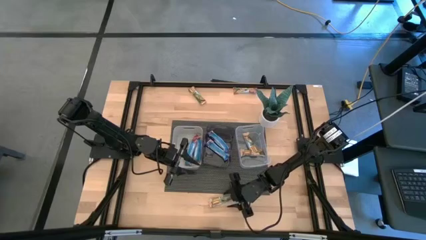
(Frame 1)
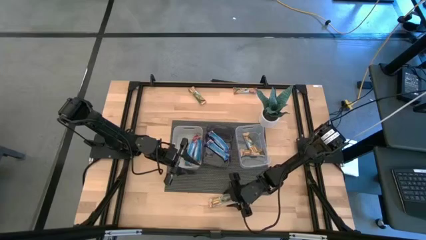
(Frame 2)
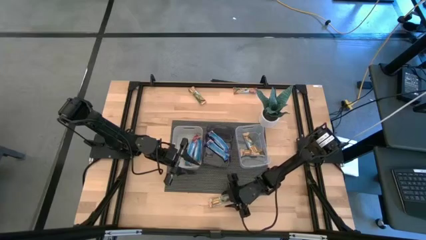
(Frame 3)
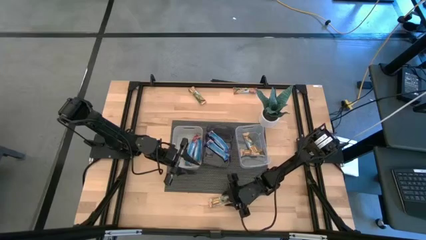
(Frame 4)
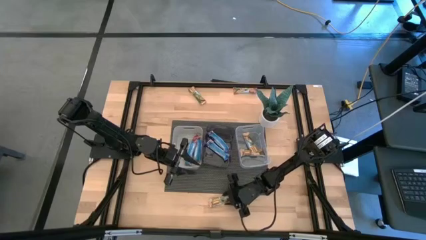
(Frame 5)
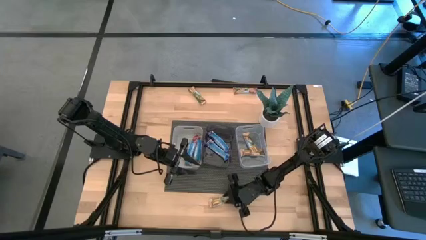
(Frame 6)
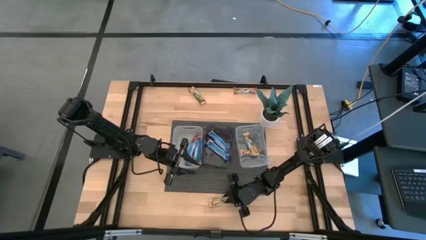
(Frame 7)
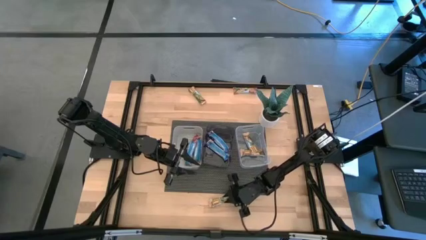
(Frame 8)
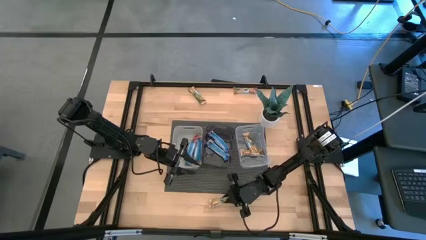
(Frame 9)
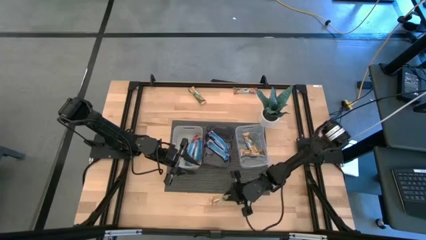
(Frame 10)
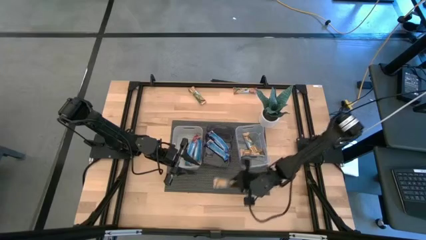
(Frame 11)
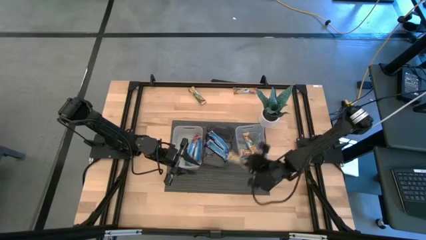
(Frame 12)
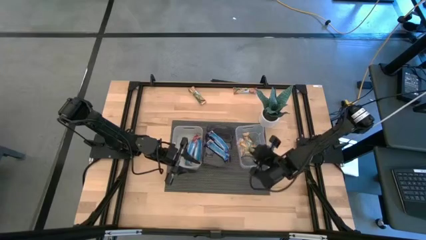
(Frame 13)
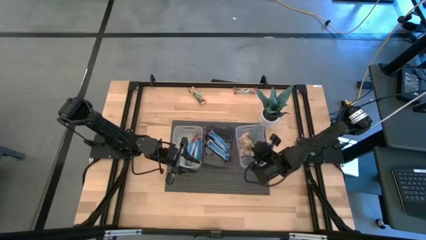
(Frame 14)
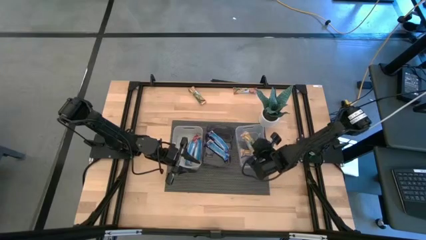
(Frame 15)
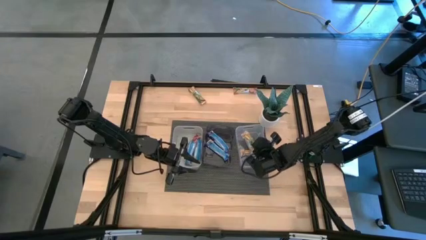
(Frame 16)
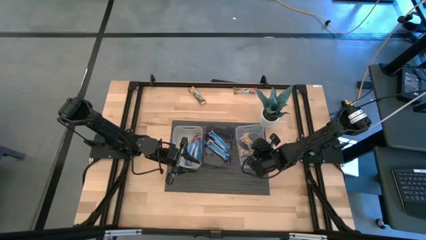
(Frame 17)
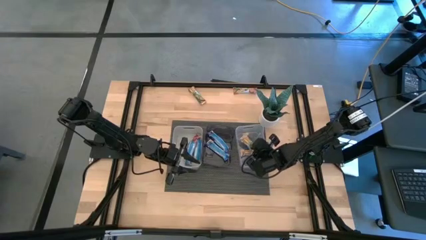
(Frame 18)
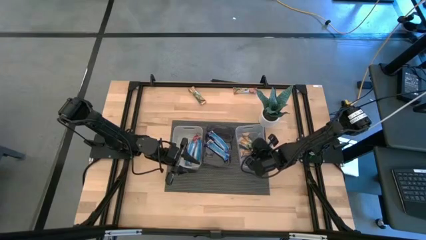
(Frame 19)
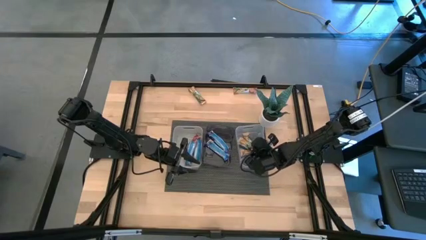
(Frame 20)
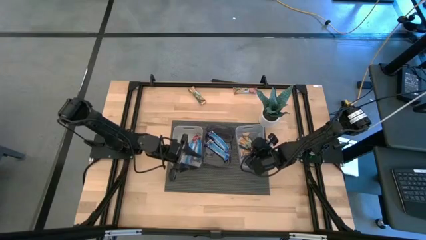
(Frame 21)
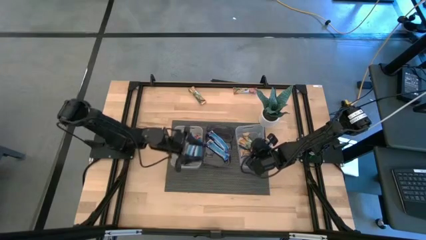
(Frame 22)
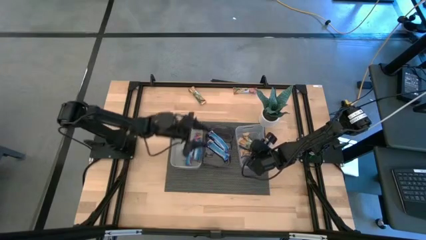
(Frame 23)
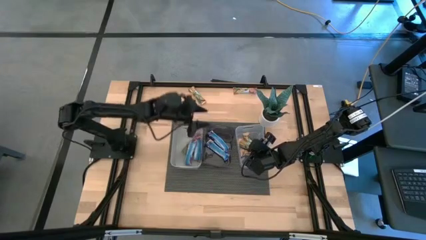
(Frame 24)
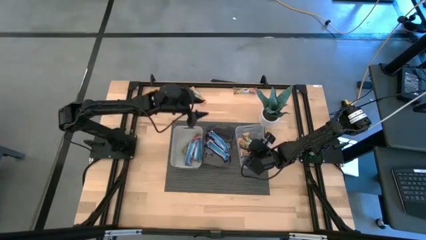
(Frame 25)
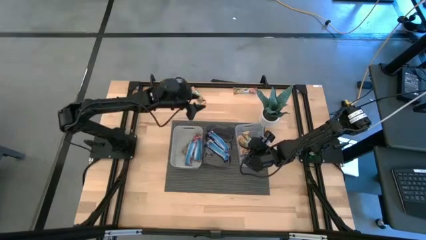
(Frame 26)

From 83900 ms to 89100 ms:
Task: Pick and place Granola Bars by type
Put the orange granola bar into the transparent bin

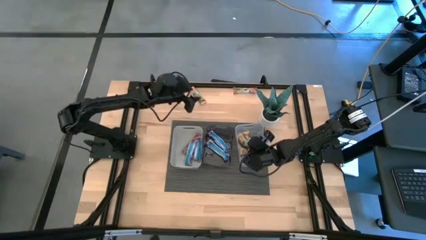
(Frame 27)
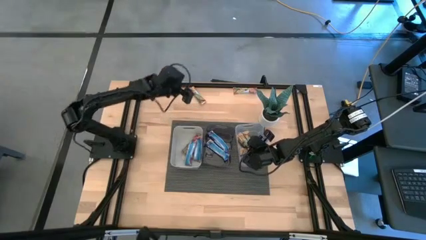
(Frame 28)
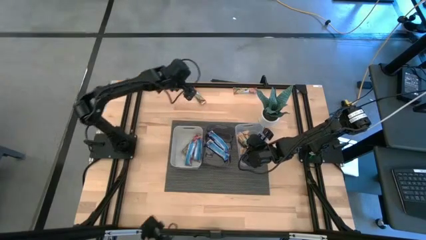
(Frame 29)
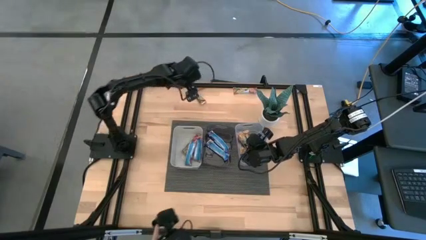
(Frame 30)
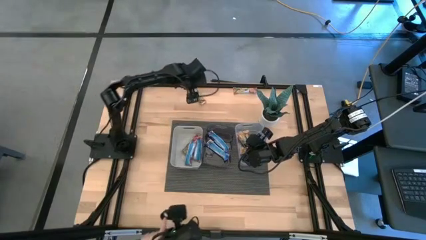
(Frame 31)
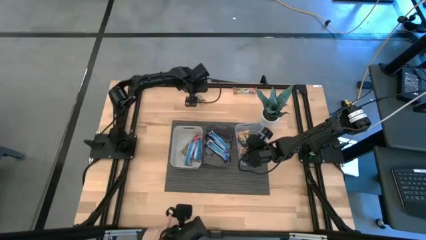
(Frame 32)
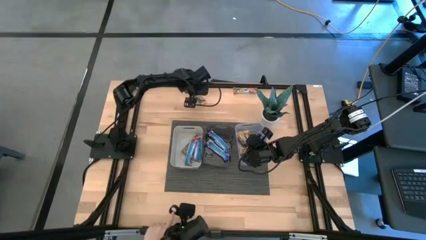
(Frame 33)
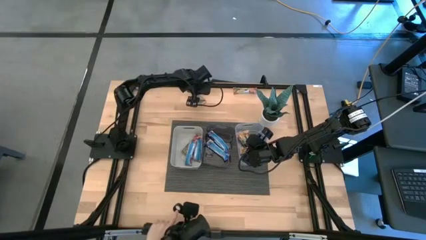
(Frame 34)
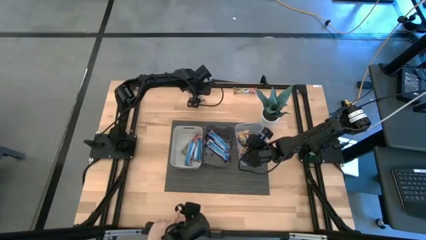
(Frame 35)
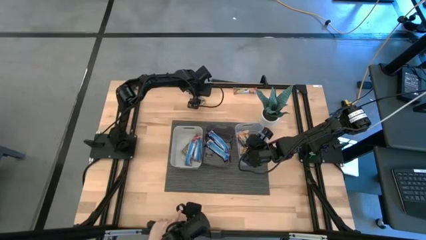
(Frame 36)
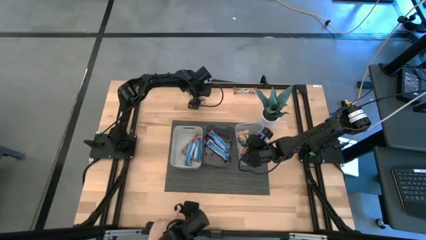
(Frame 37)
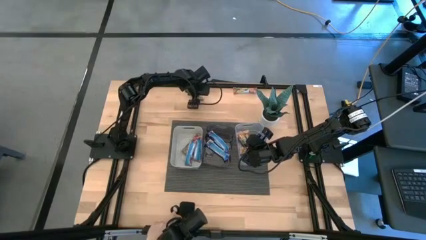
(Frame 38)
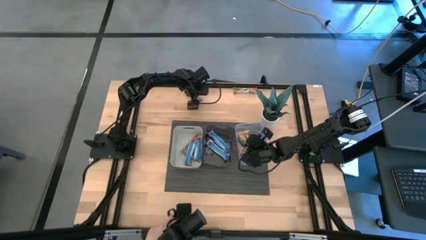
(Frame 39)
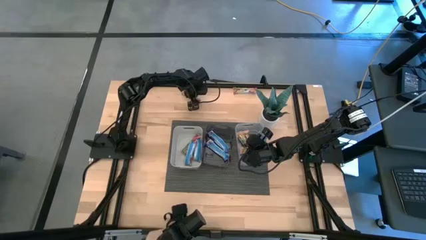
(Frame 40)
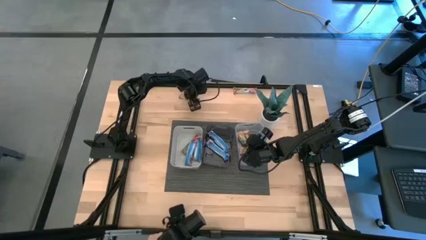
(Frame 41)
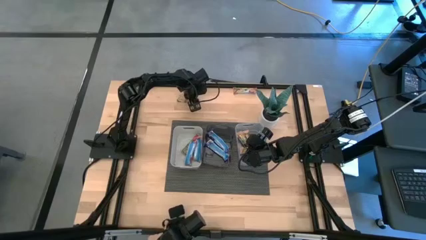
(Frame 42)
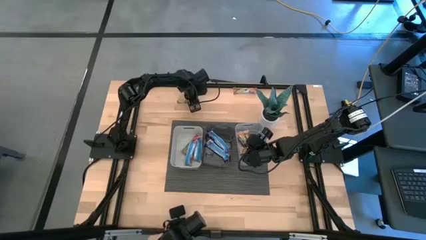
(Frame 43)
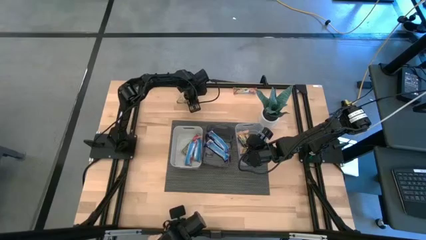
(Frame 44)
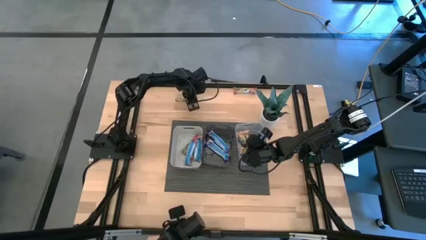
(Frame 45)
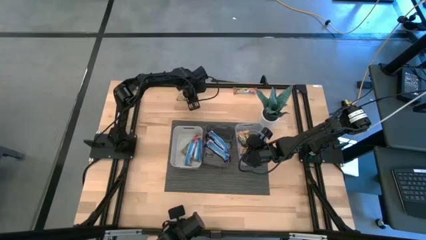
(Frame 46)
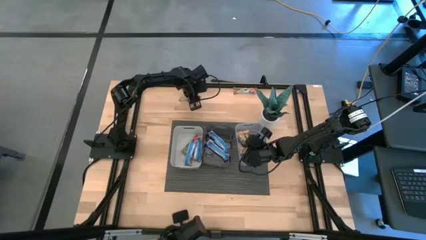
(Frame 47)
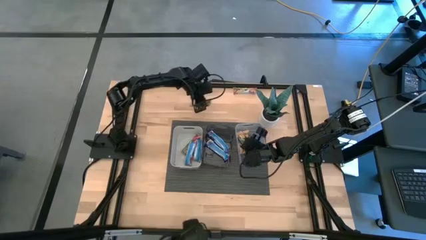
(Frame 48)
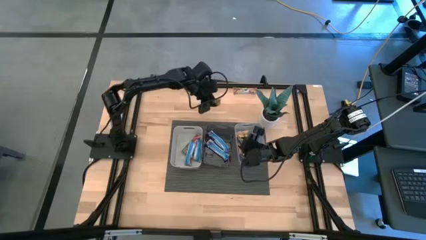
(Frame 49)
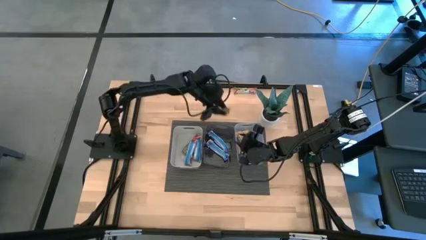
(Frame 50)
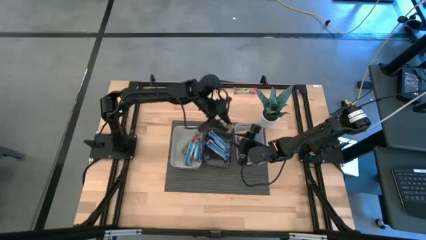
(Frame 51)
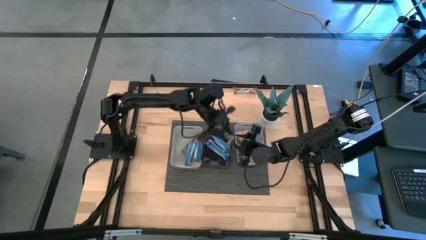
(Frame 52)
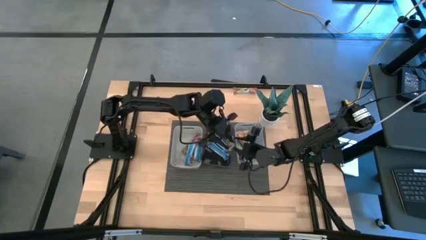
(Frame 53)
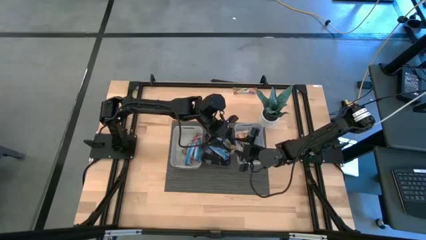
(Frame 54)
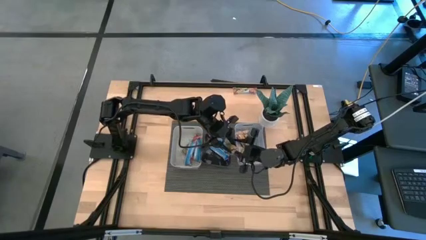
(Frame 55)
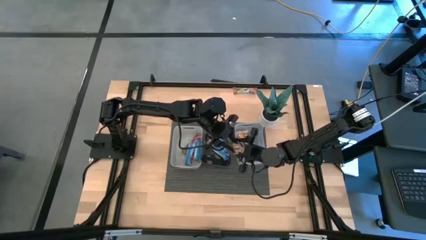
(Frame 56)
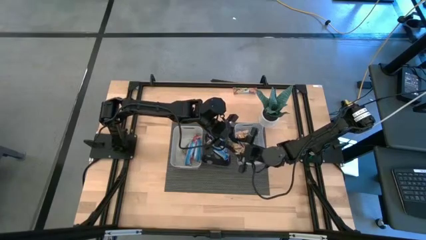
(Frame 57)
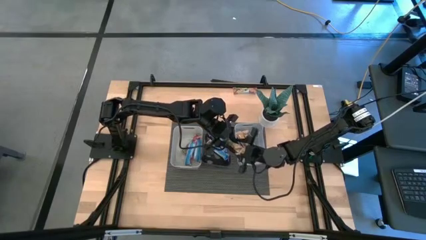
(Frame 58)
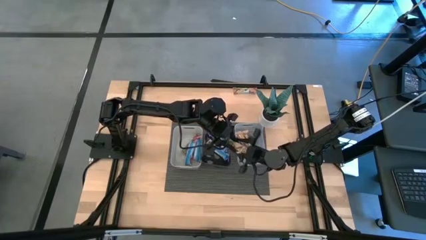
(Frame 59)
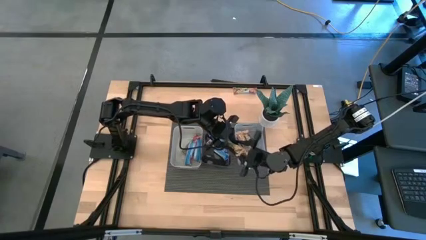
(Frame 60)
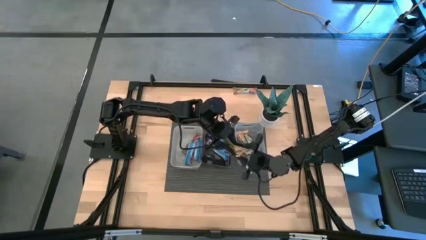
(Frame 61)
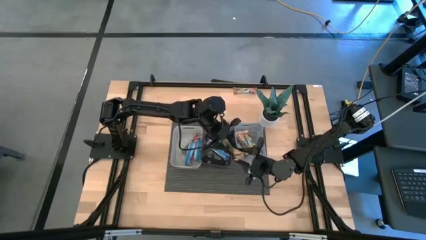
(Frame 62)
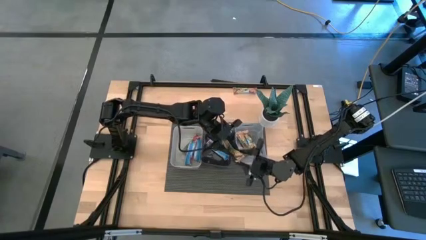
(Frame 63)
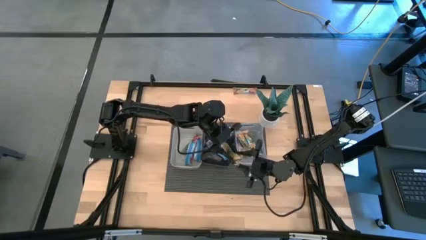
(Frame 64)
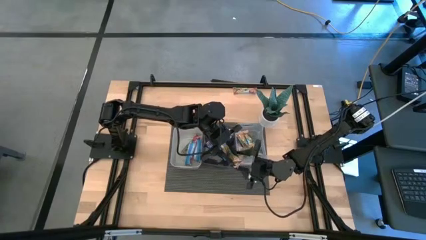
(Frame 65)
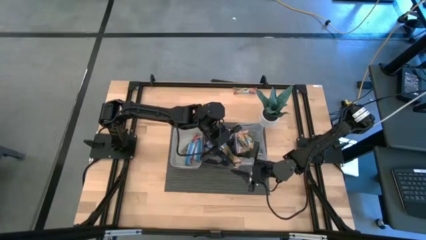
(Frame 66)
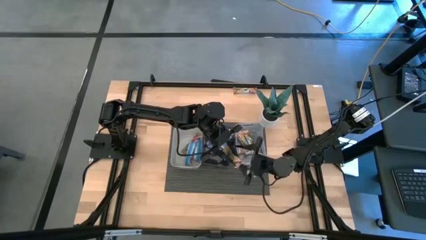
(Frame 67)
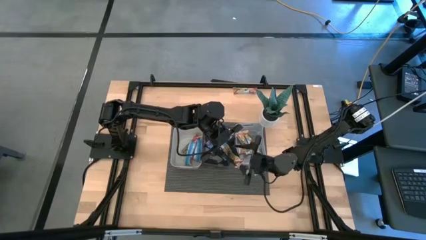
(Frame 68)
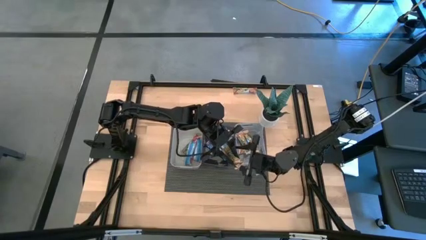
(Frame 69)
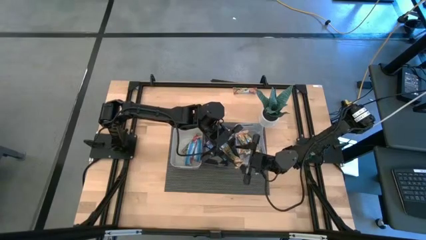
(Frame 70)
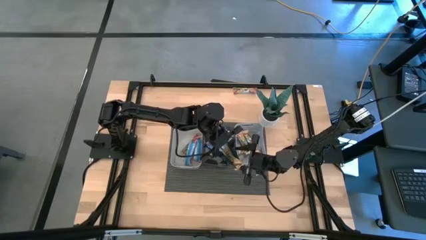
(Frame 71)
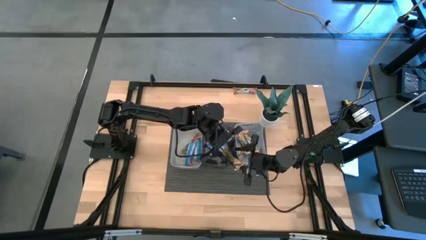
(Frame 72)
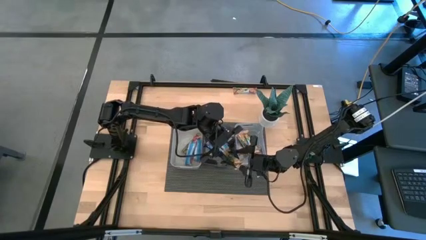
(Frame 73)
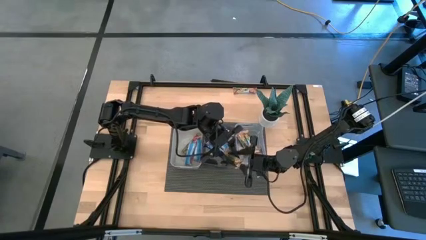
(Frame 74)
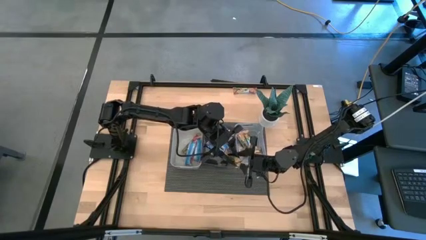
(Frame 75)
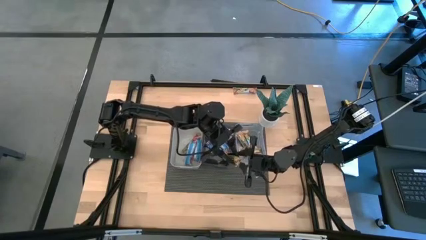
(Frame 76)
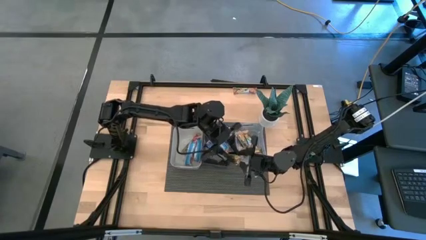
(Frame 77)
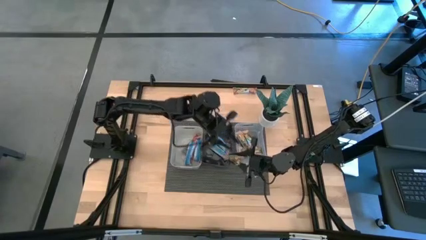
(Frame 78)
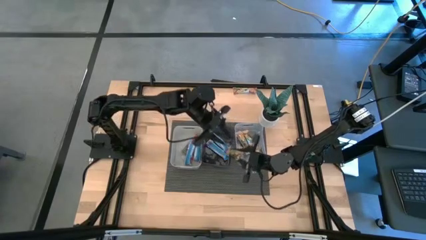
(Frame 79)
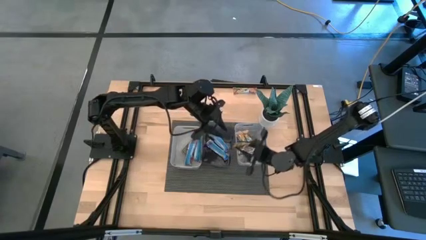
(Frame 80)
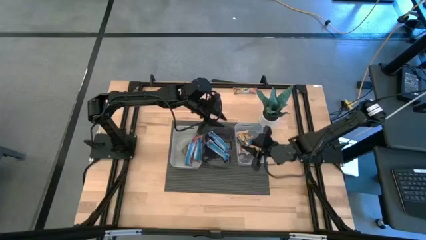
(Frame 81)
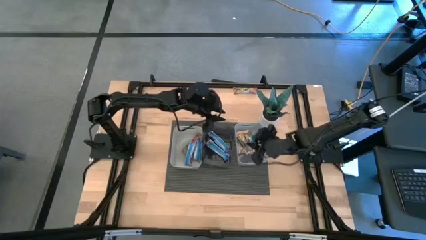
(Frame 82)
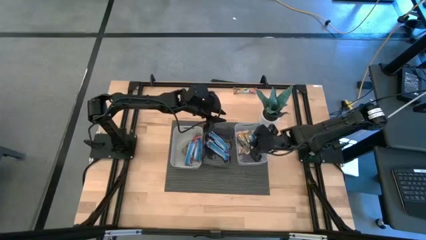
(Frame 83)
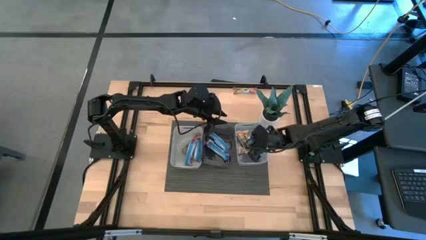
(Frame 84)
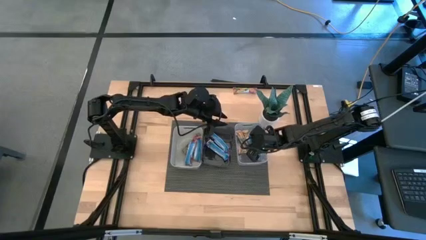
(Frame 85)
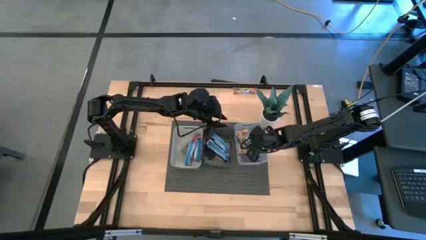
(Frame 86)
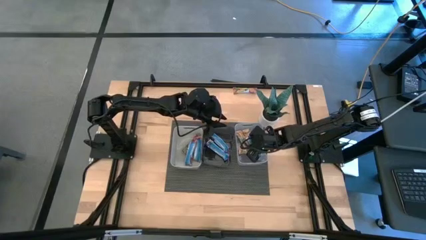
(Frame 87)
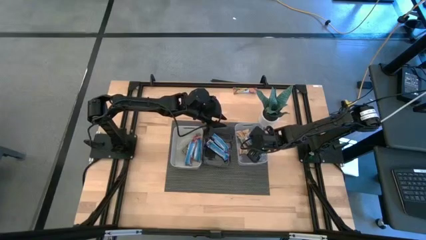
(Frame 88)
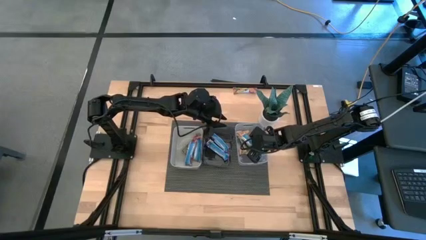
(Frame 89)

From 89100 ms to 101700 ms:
Put the orange granola bar into the transparent bin
